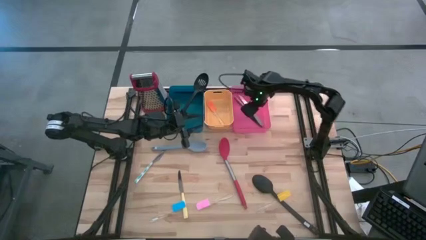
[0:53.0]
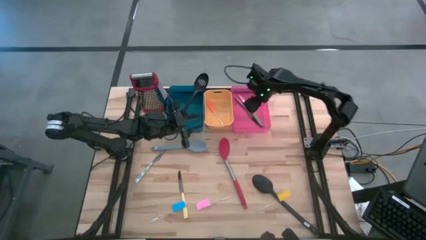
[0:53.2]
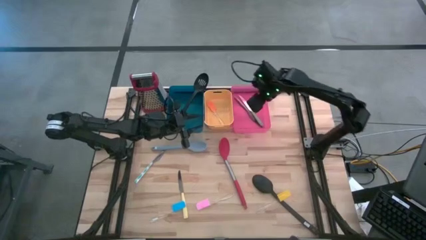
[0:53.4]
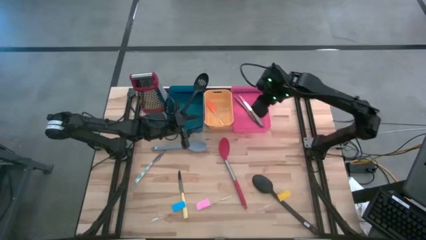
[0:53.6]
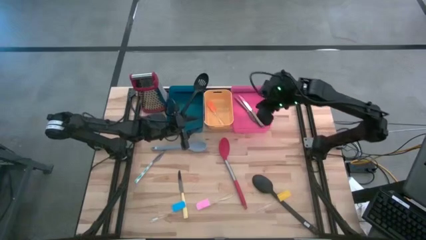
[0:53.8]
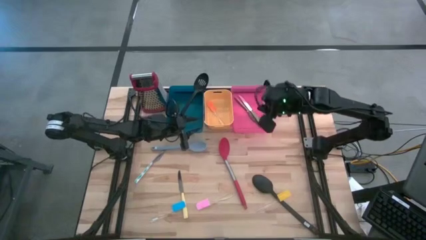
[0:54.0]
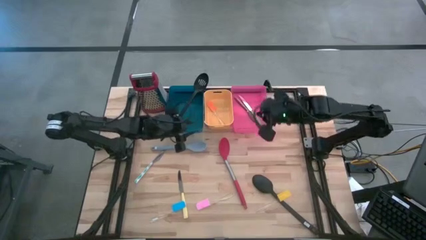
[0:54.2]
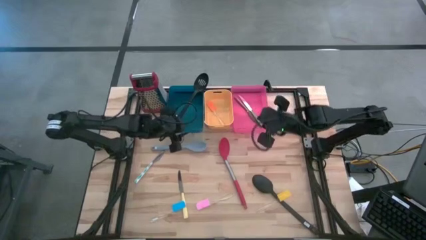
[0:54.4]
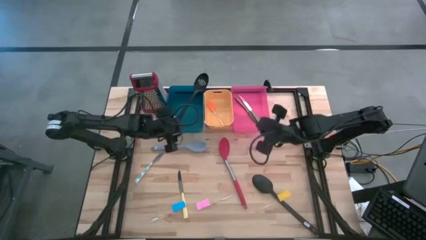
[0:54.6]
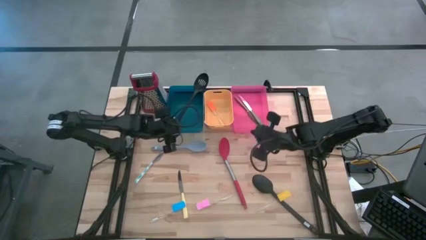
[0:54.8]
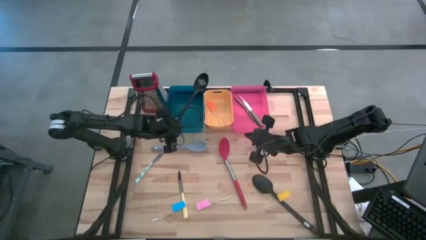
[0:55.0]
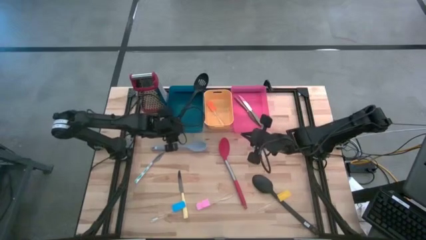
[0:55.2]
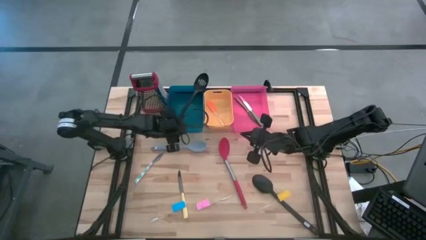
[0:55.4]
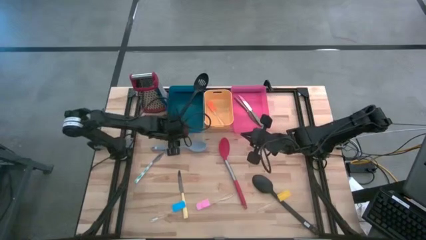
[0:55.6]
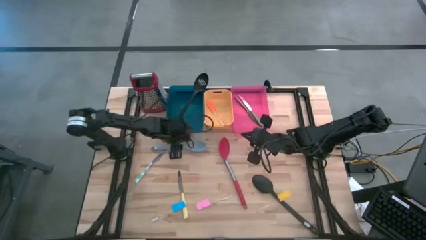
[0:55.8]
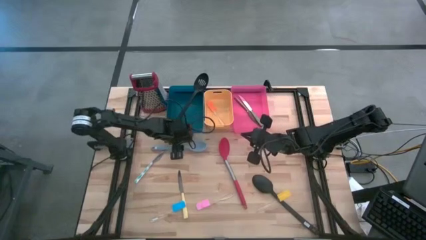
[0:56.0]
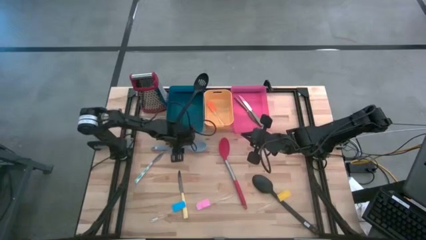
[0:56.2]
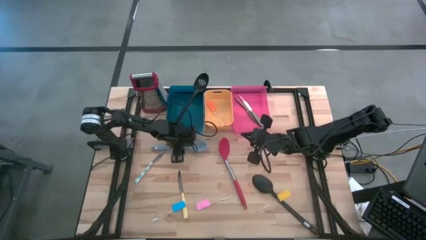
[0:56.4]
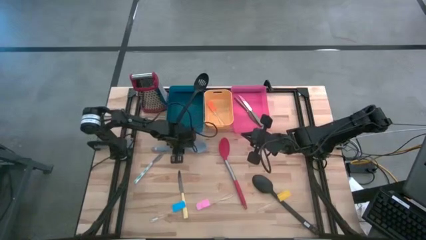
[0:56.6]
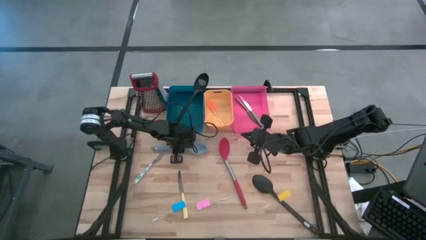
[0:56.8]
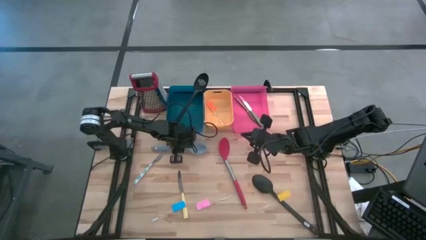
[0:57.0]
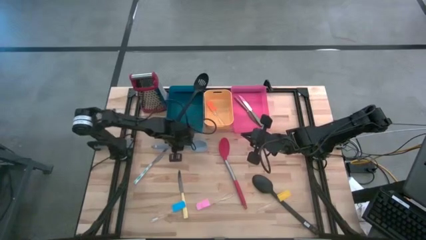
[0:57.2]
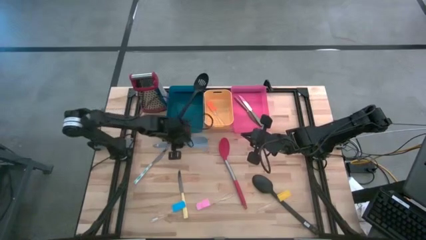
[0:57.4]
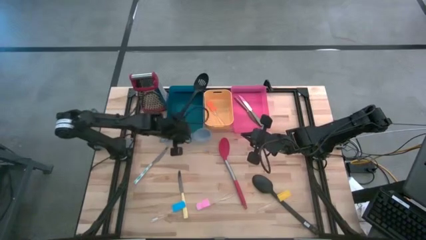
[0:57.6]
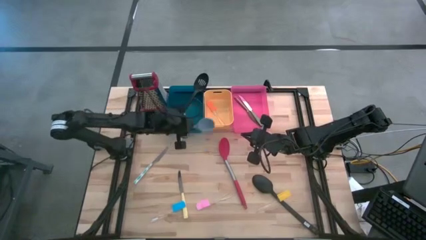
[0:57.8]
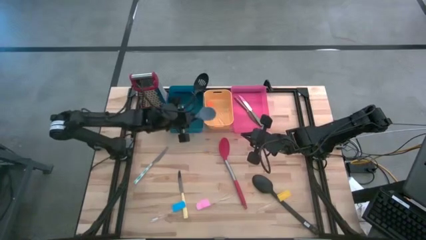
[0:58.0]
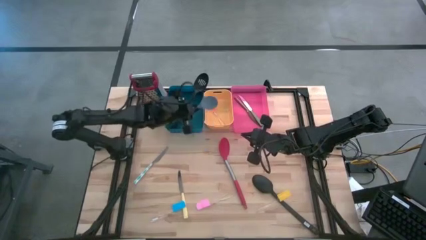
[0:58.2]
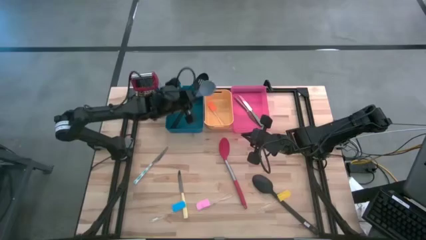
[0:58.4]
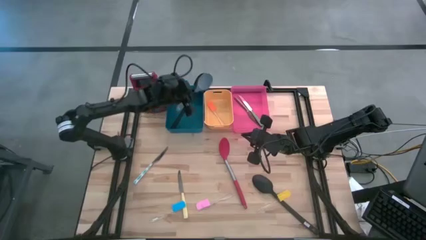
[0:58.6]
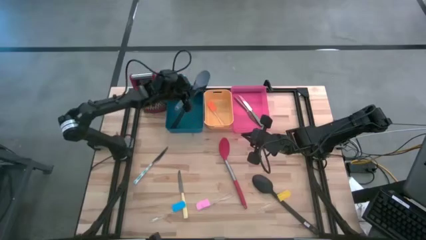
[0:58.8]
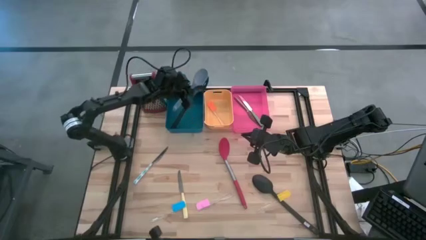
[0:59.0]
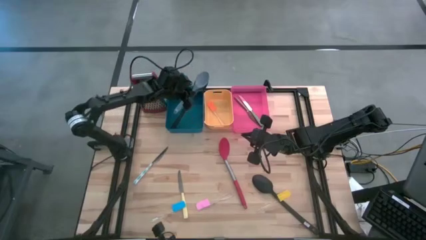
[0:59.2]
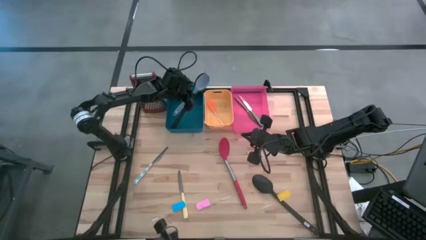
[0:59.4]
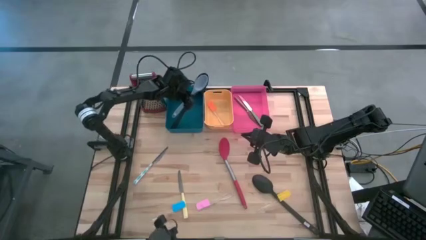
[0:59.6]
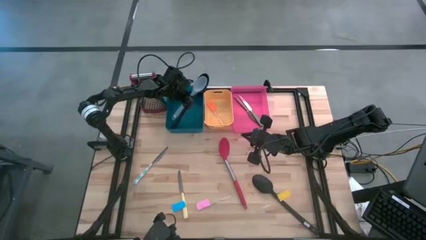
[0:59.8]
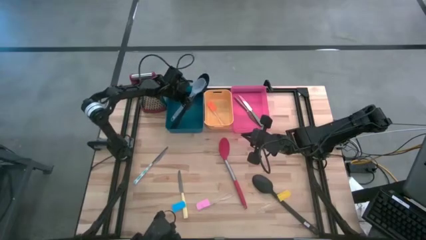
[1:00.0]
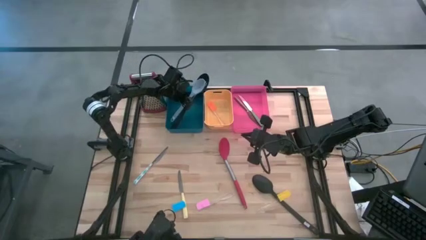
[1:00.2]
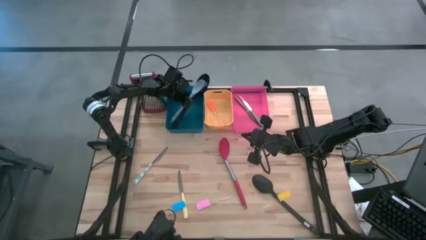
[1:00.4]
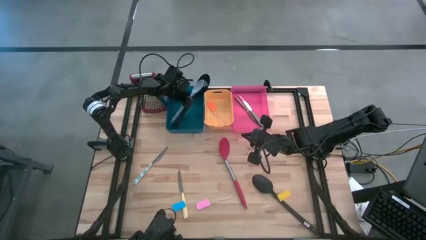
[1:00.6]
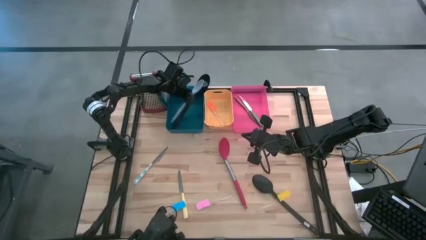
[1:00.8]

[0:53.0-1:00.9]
Task: Pick & Place Kitchen Items
Put the blue serving spoon into the blue bin

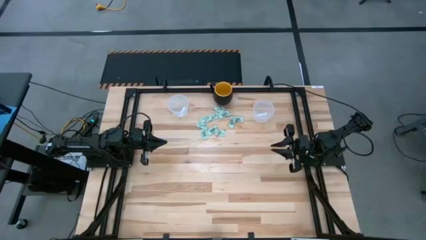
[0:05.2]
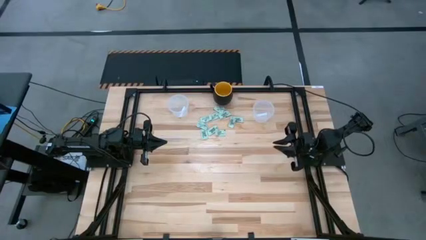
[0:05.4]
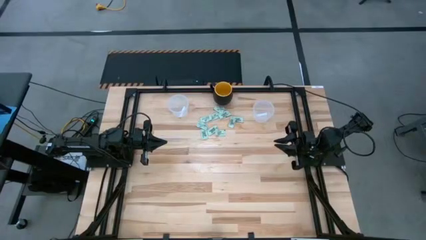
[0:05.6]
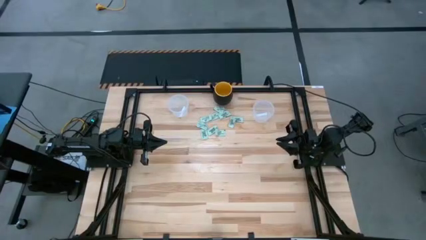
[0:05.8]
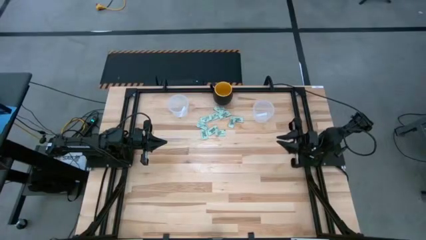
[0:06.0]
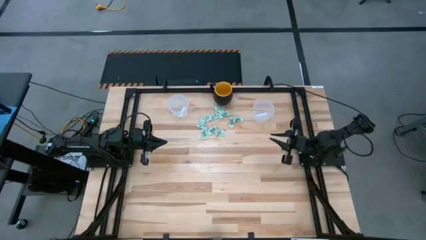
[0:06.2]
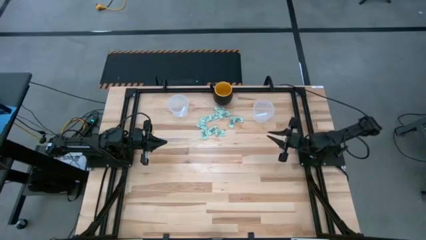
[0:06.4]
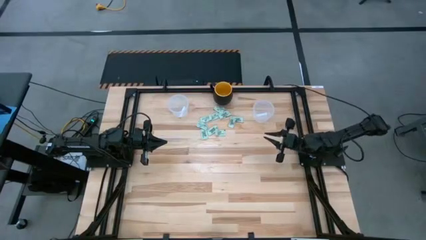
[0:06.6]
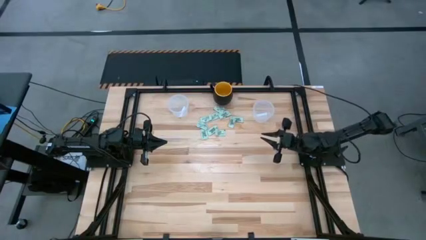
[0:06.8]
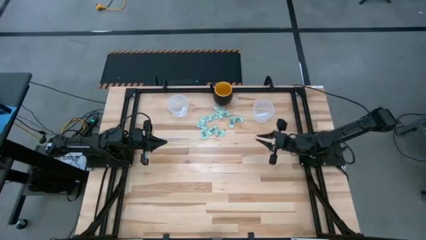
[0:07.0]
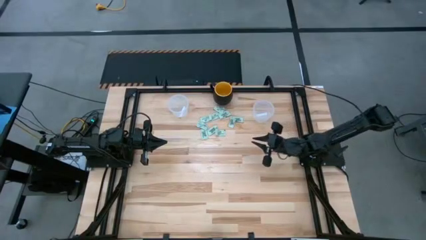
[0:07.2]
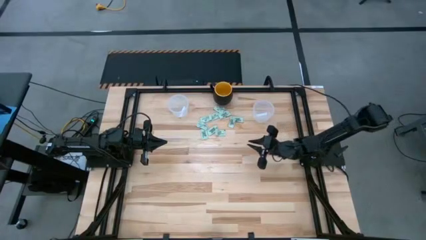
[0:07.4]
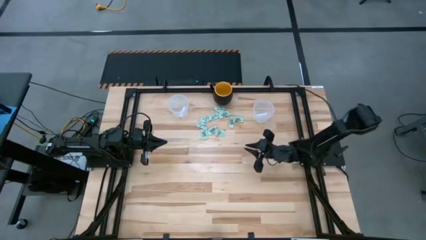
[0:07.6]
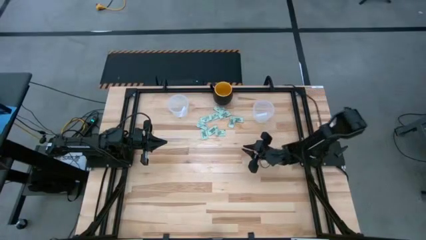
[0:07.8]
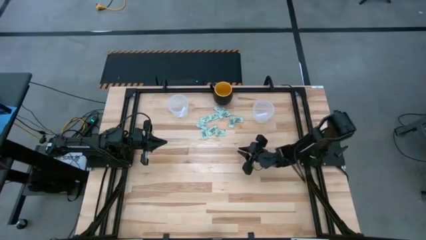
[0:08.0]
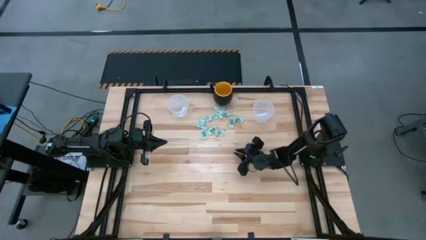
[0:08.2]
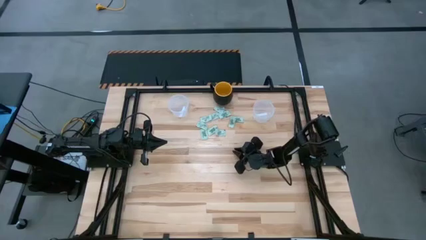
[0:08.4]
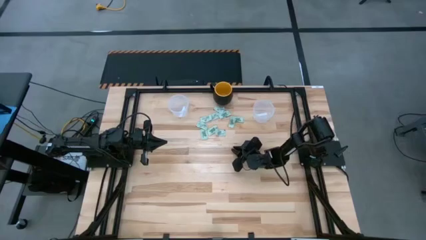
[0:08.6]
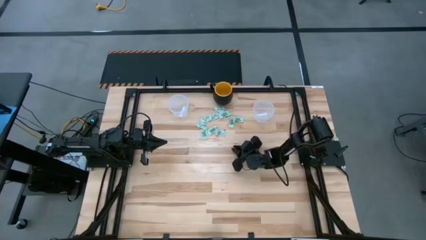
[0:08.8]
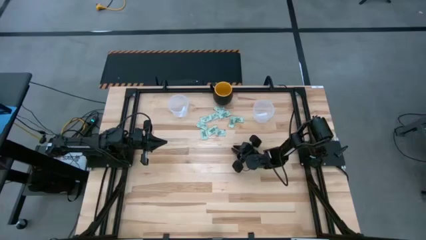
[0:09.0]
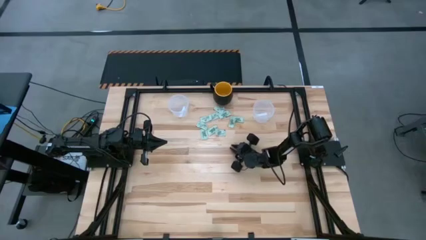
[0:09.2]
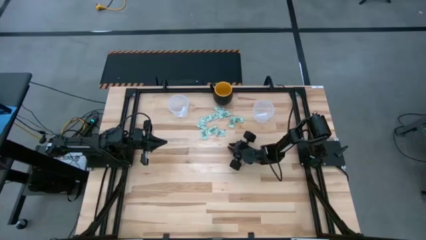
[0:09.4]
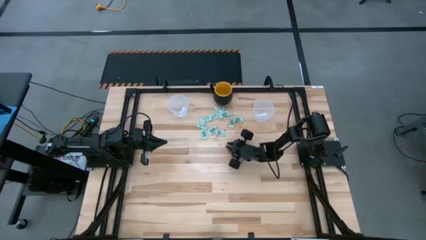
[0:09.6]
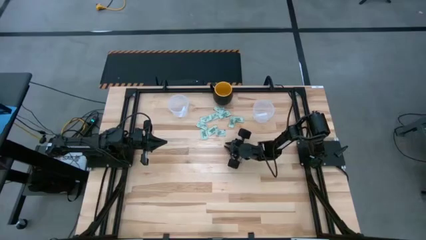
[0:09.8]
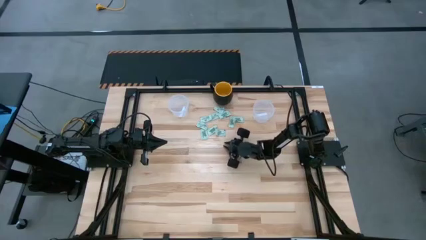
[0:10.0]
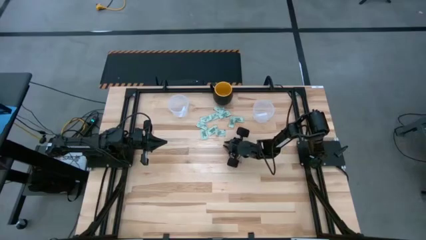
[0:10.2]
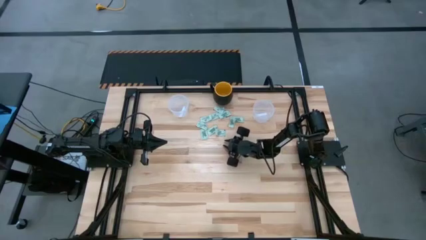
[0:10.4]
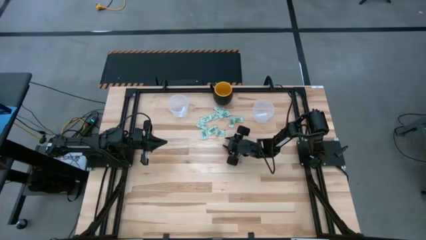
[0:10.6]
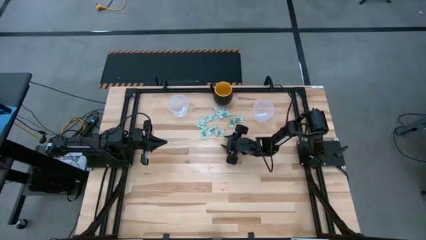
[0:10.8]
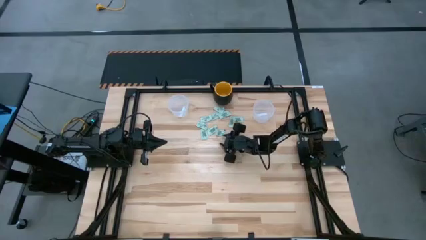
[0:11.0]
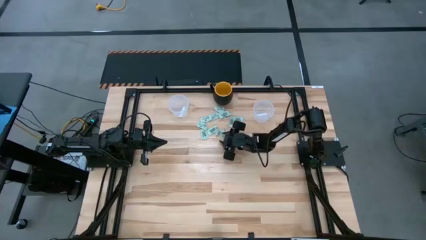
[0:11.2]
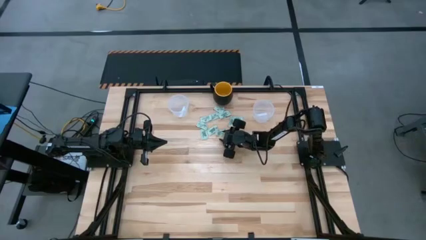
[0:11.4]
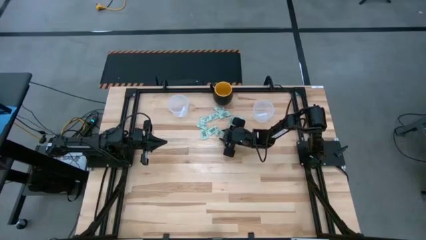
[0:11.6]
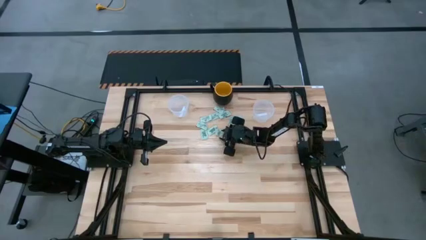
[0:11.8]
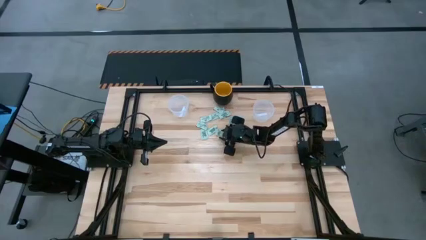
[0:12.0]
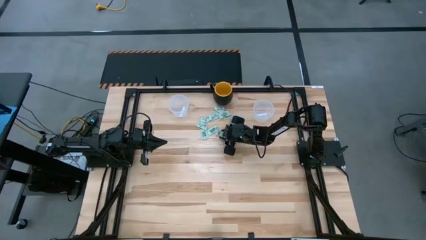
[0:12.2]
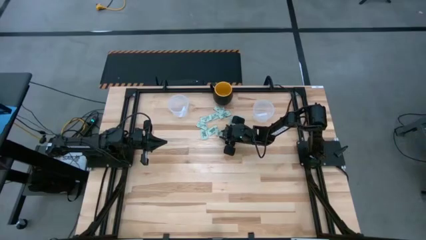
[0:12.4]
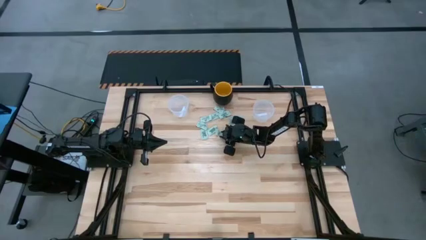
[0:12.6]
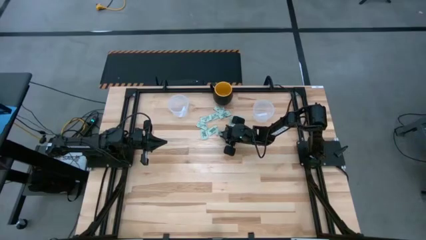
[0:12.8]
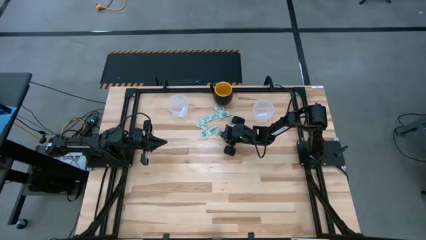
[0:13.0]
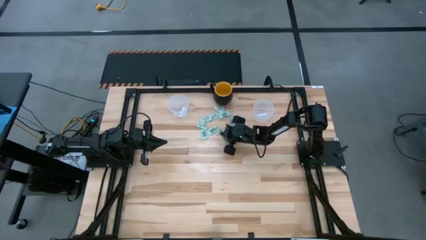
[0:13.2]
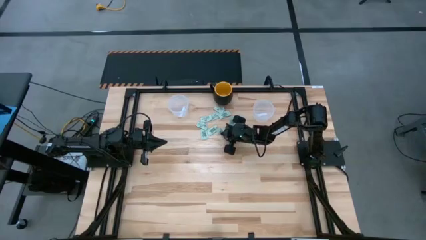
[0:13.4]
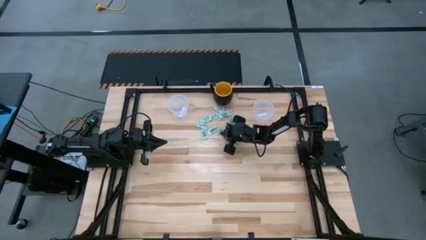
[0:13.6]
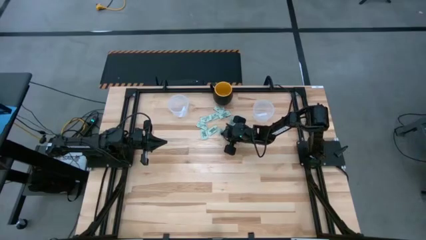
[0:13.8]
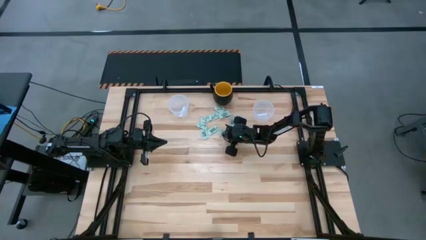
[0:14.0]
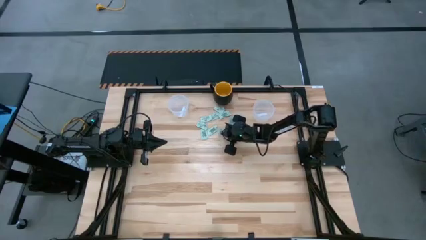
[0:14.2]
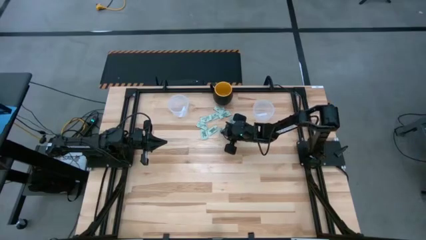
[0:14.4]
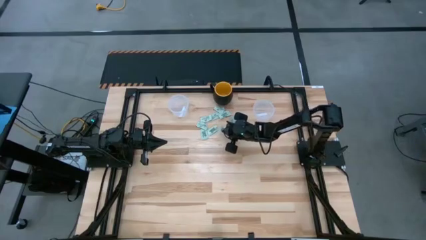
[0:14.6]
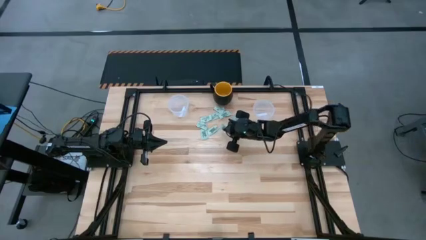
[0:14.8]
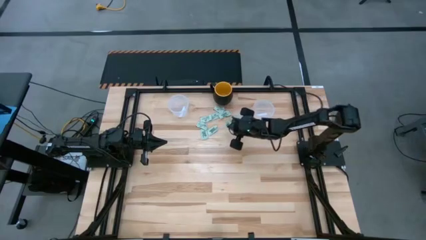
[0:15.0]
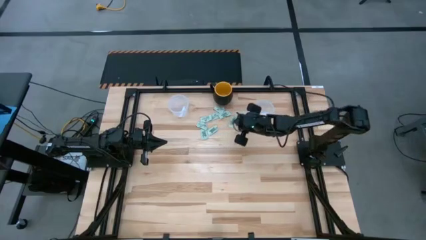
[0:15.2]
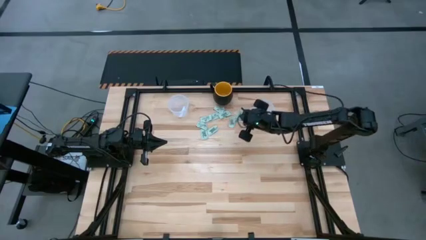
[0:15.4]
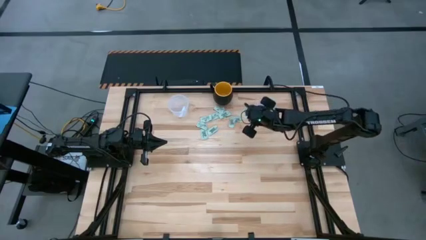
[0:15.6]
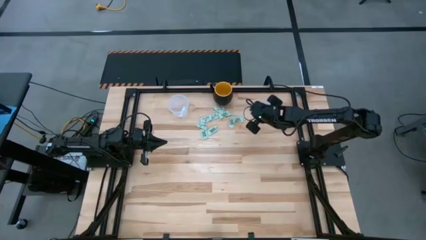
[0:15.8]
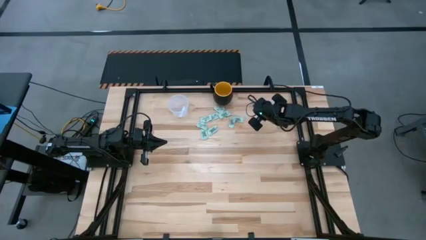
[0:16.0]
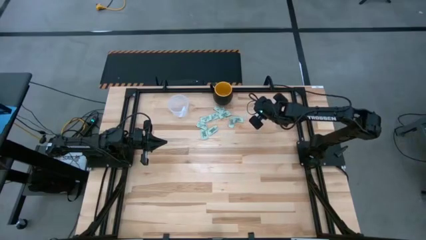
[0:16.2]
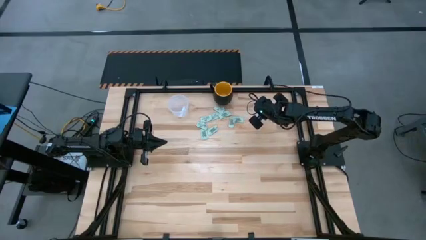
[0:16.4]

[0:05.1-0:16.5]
Task: Pick and place Stevia / Truvia into bins
Put the stevia packet into the right transparent container
